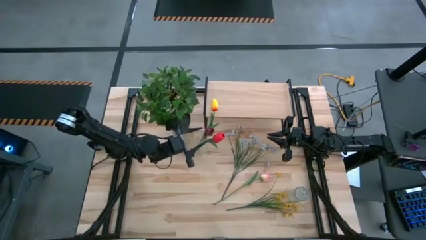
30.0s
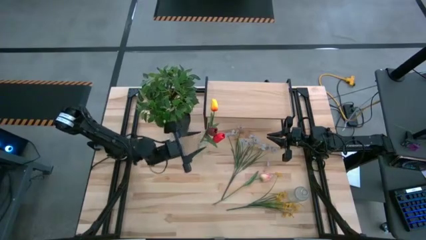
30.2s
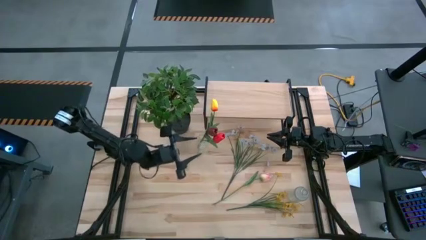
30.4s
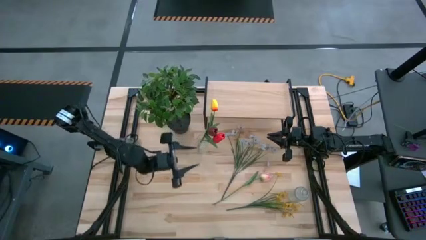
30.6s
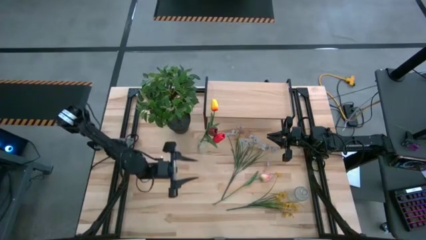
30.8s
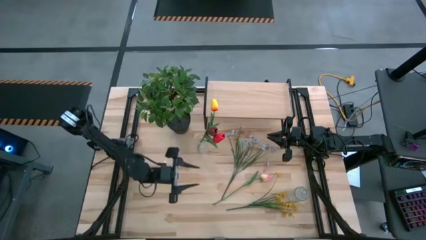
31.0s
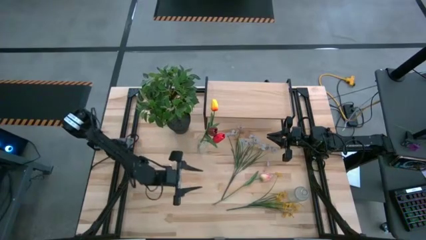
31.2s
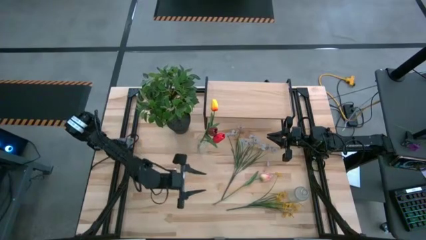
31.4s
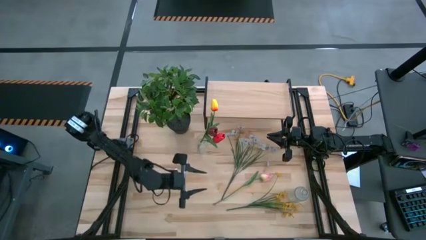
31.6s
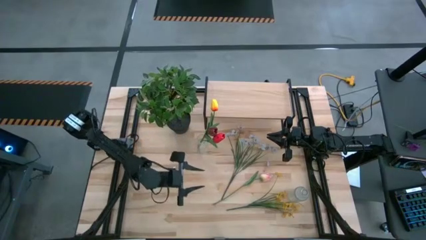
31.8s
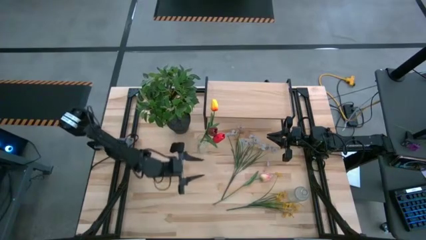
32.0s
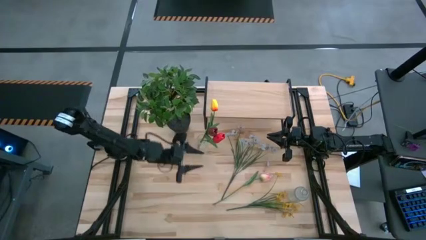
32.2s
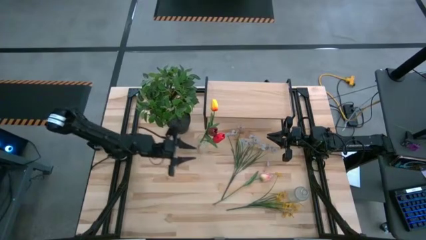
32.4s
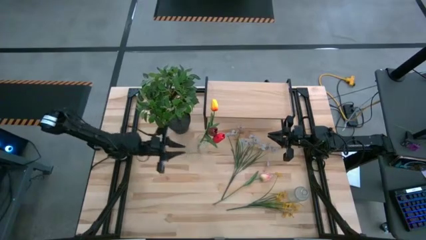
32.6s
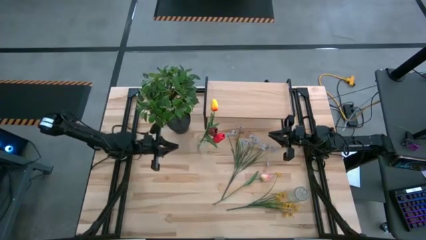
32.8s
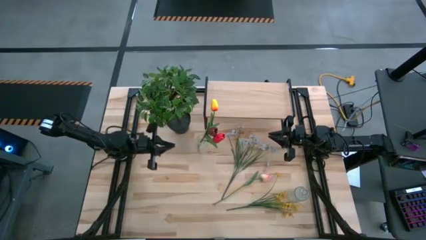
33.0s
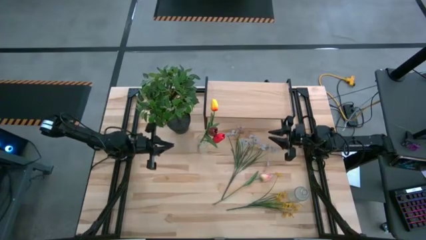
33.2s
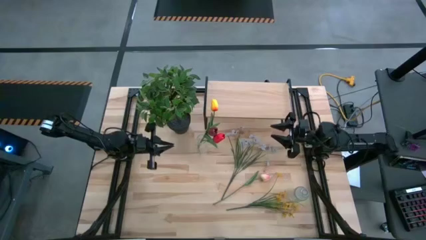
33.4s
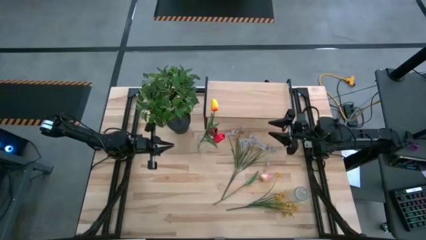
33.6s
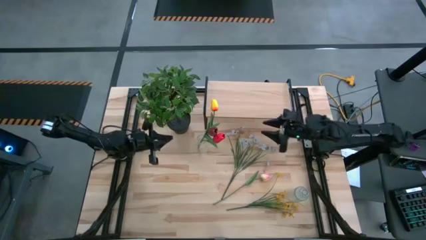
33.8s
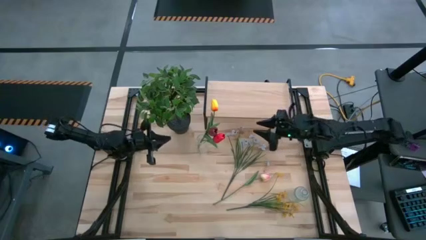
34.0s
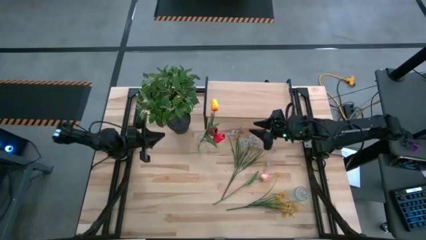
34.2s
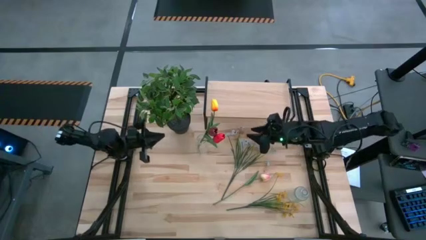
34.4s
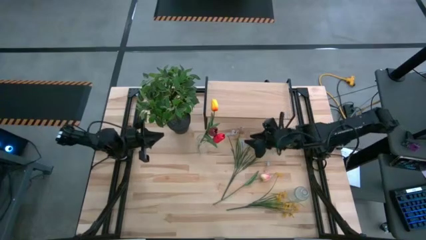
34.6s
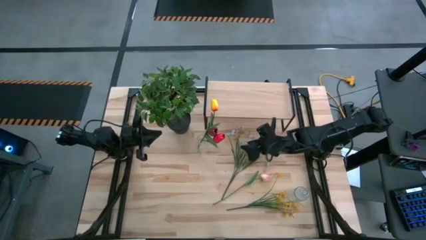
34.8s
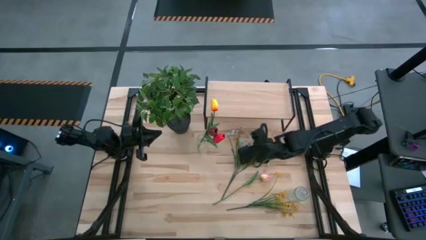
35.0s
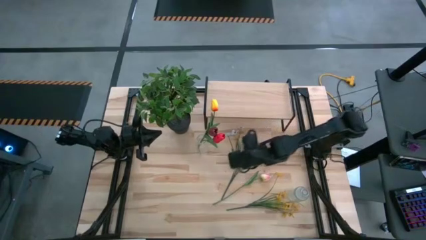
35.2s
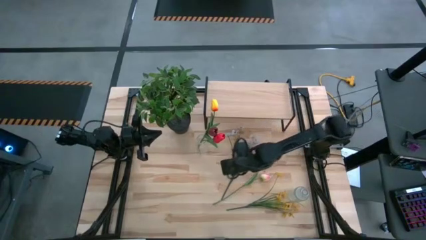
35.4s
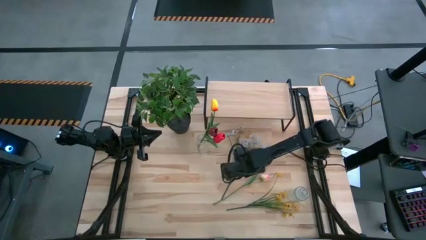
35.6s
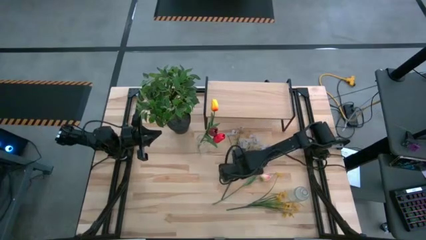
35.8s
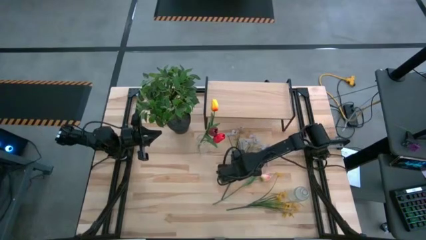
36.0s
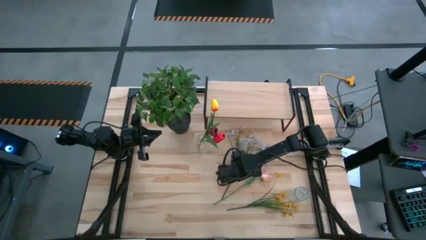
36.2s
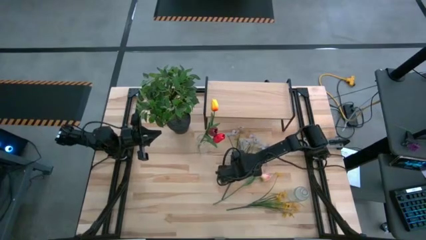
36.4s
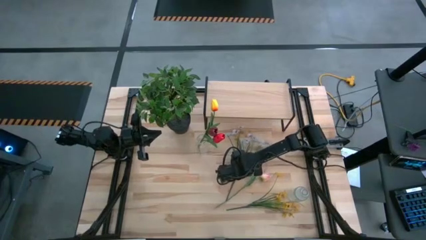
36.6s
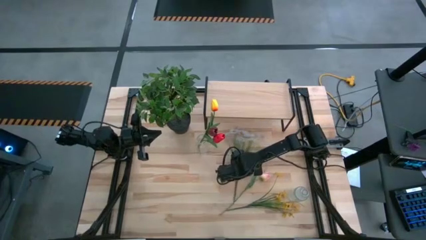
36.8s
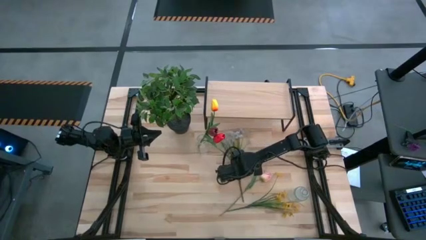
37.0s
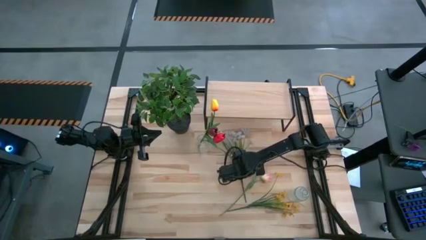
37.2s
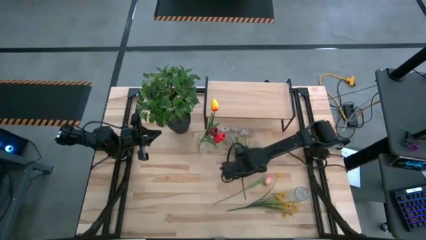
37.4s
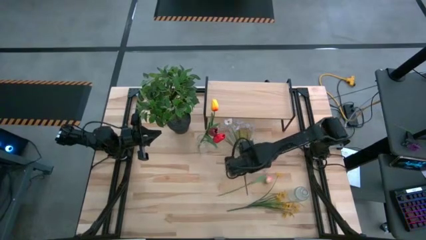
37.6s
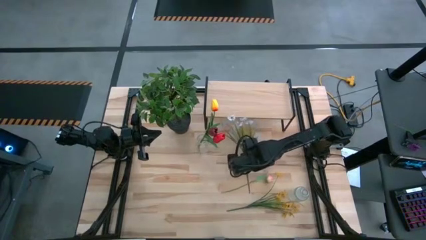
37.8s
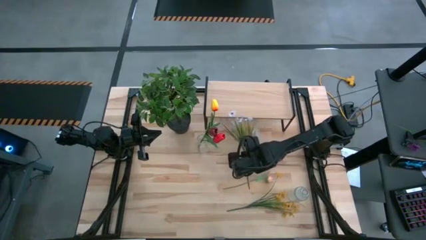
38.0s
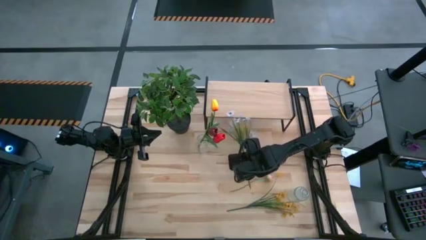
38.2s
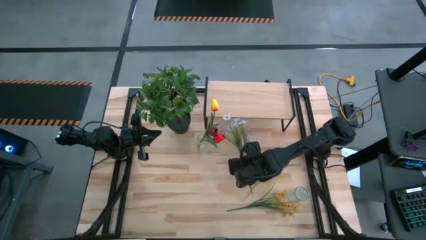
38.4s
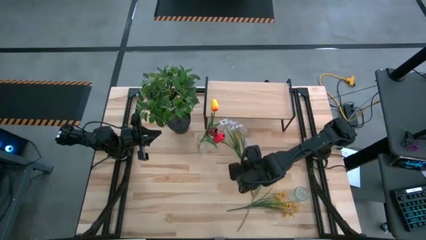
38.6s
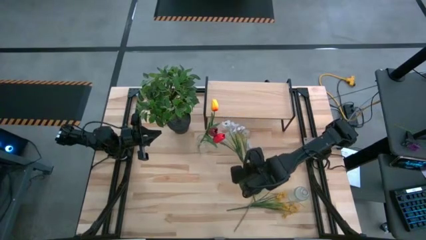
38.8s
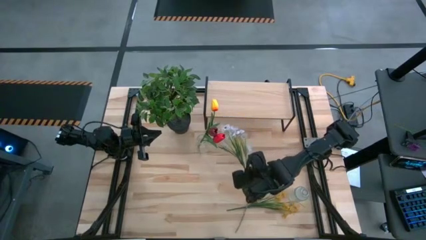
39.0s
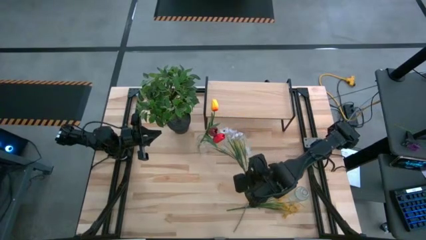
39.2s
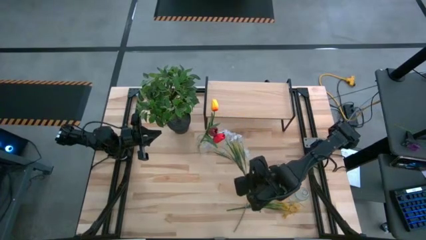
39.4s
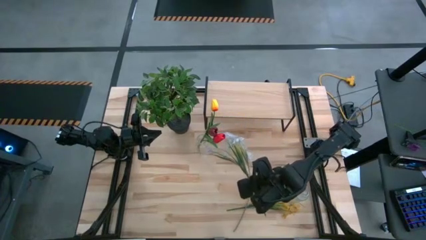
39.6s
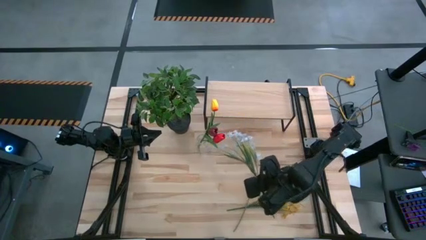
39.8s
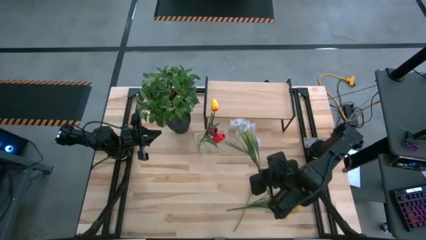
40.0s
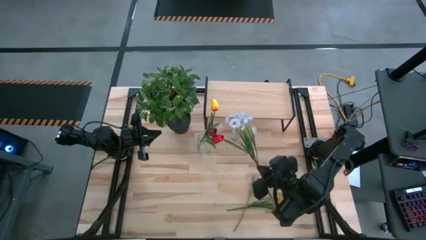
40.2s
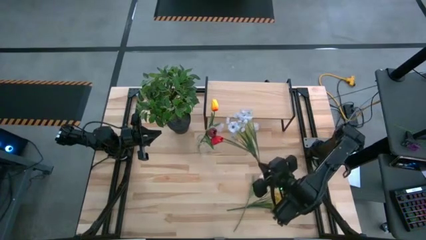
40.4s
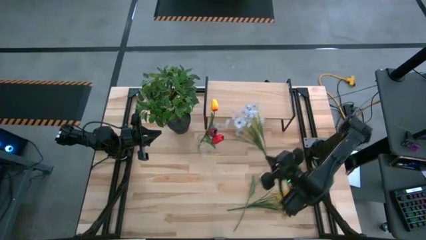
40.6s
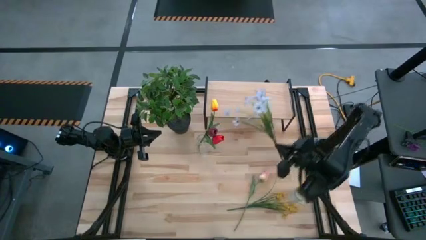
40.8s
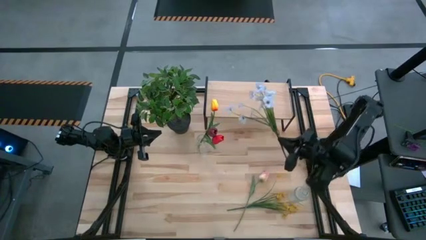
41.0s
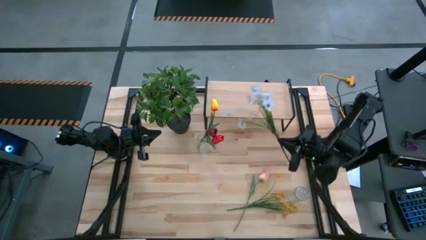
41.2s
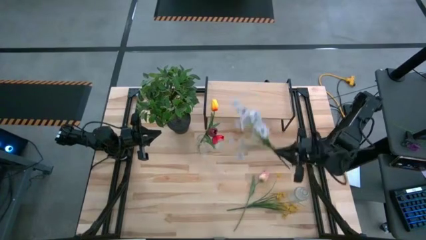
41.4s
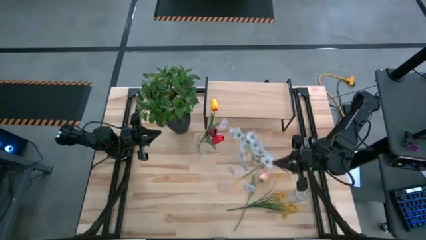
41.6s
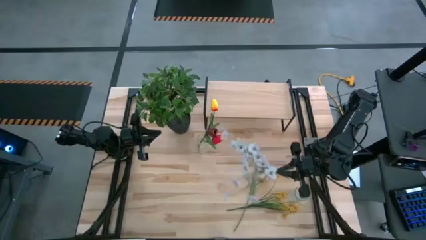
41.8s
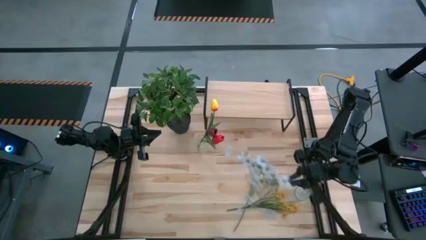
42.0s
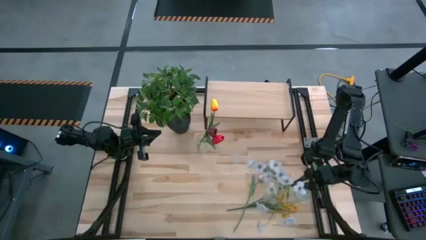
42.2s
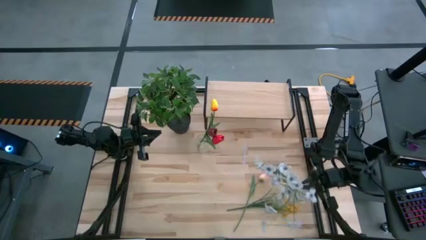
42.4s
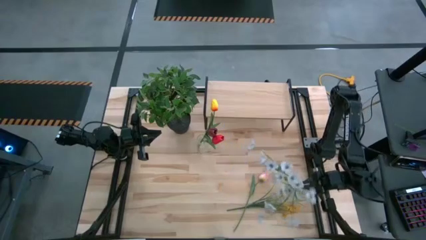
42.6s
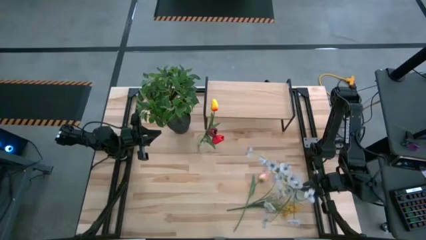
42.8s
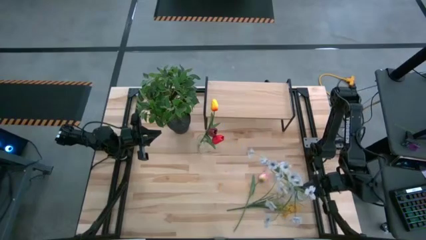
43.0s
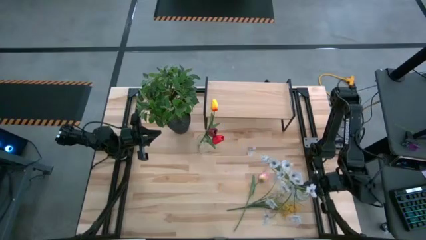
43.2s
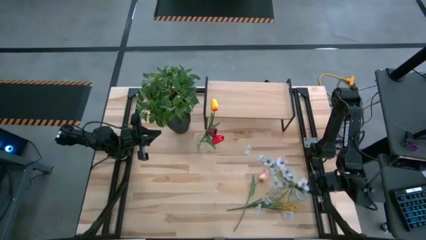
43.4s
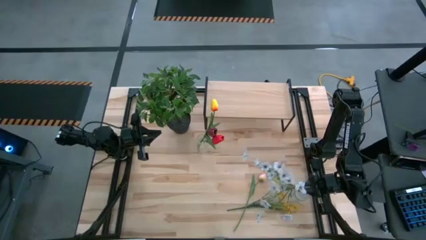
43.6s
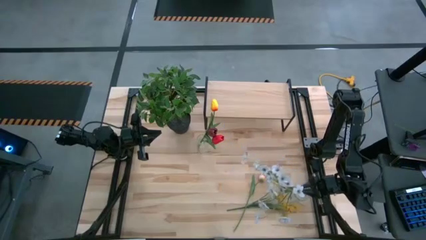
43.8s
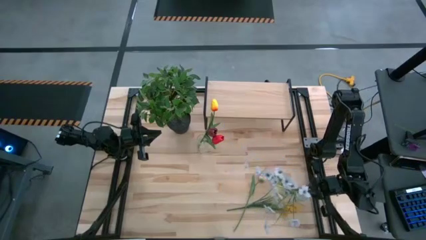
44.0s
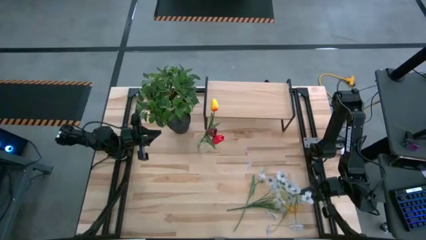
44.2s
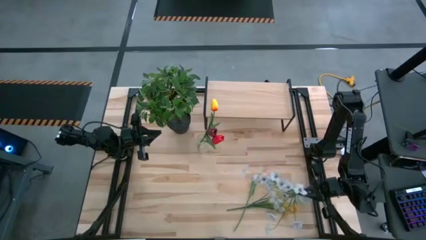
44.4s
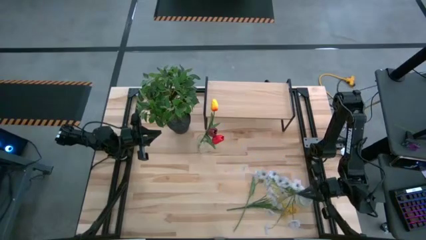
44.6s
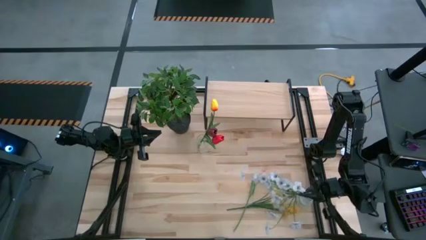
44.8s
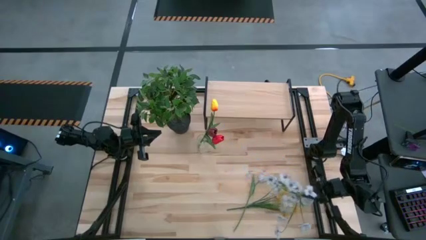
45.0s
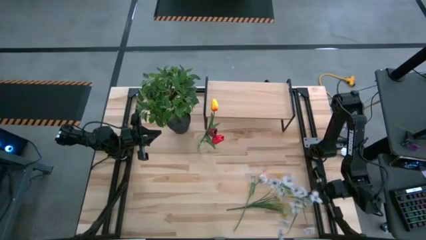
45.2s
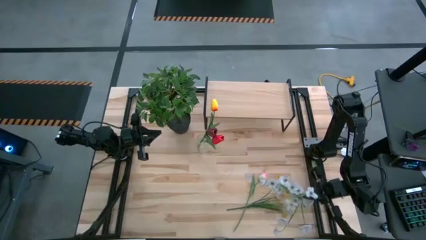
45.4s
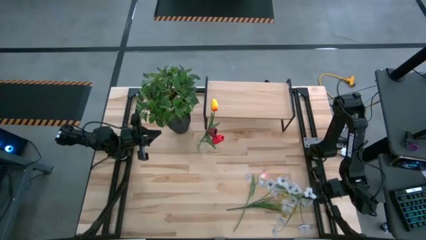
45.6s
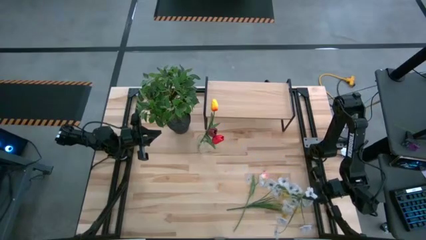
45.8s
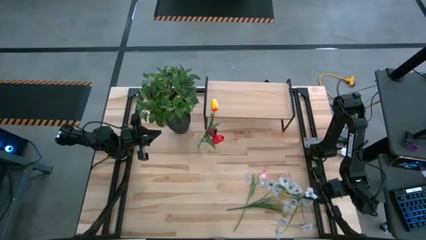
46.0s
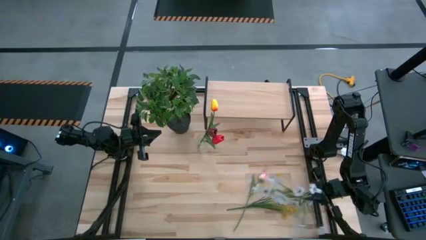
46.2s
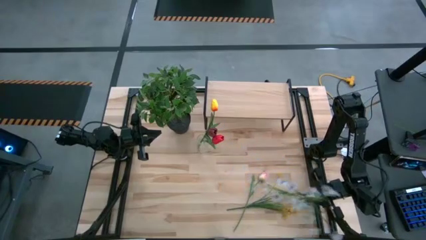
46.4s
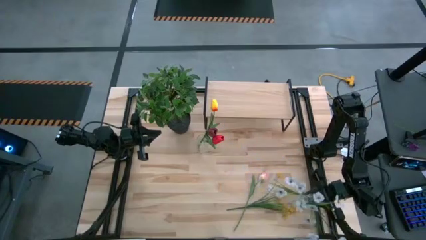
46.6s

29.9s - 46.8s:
Task: Pick and place flowers into a vace then onto a shelf
Put the white flowers into the bottom transparent vase
